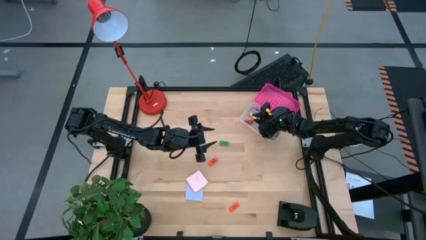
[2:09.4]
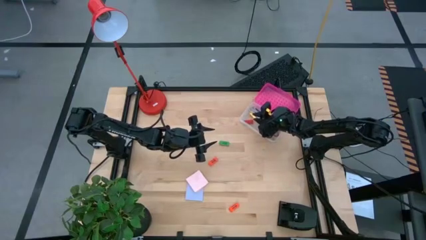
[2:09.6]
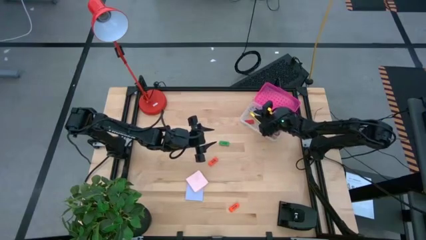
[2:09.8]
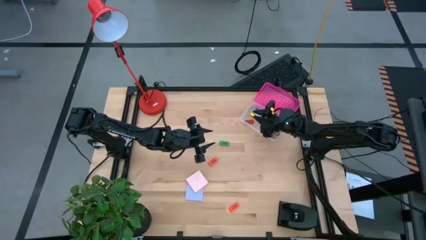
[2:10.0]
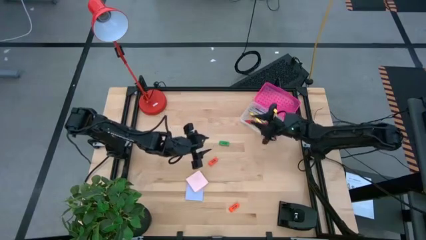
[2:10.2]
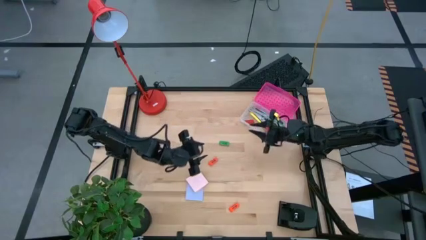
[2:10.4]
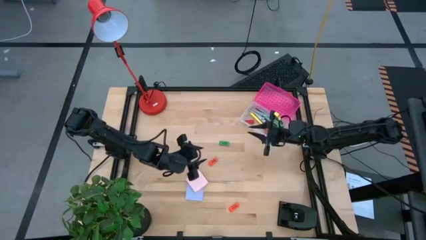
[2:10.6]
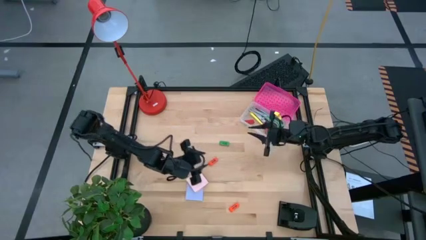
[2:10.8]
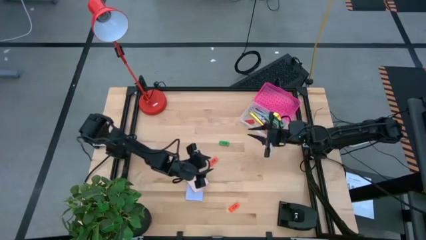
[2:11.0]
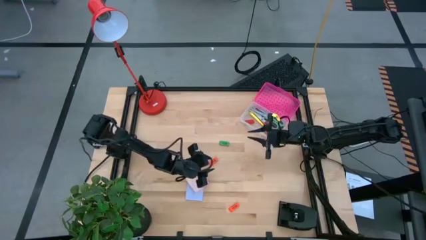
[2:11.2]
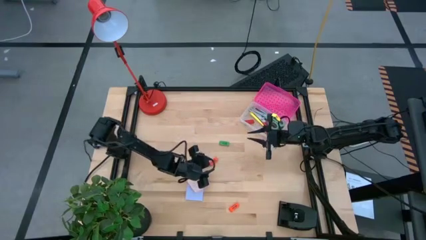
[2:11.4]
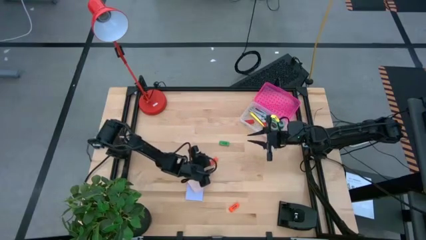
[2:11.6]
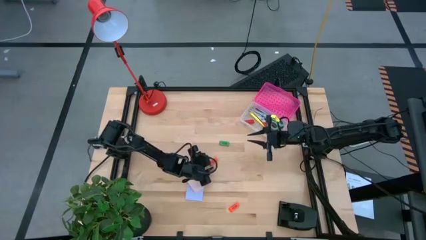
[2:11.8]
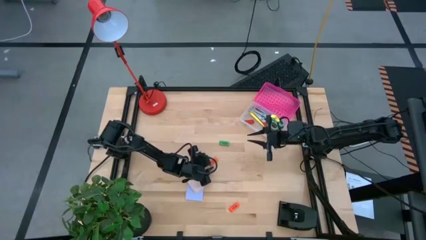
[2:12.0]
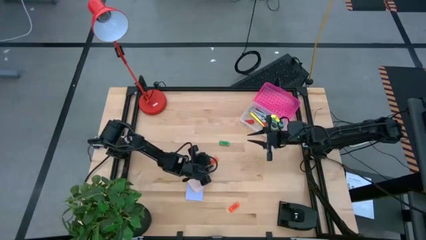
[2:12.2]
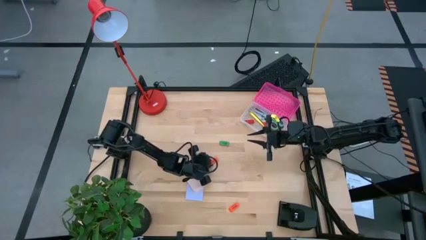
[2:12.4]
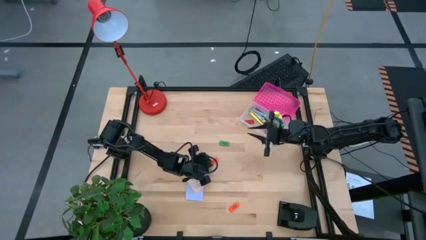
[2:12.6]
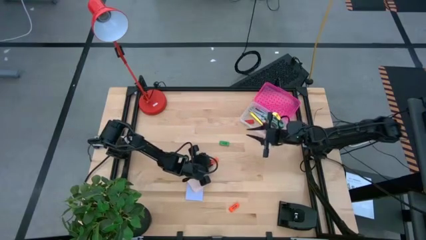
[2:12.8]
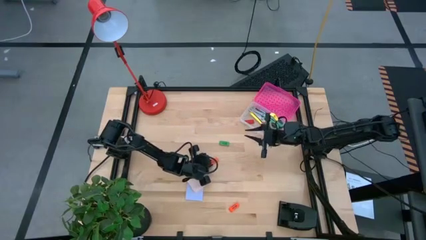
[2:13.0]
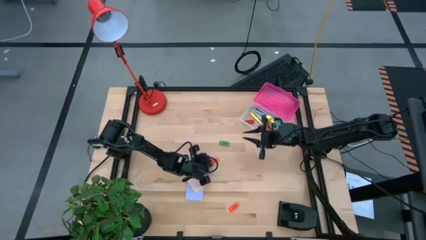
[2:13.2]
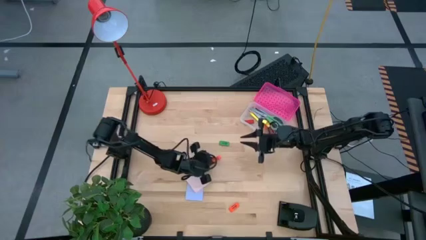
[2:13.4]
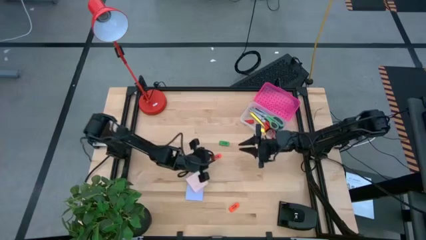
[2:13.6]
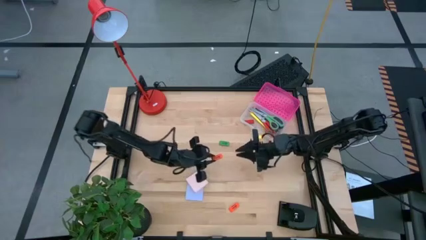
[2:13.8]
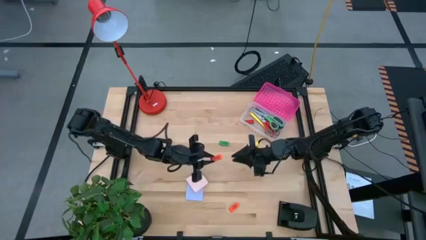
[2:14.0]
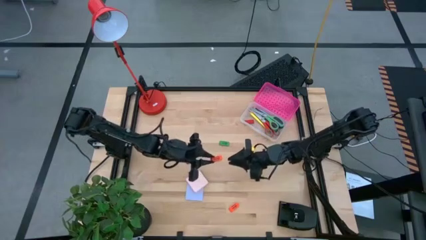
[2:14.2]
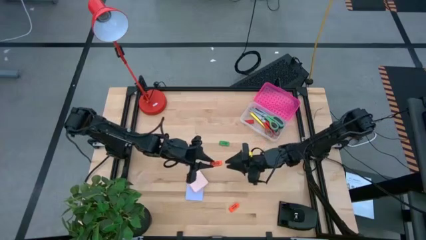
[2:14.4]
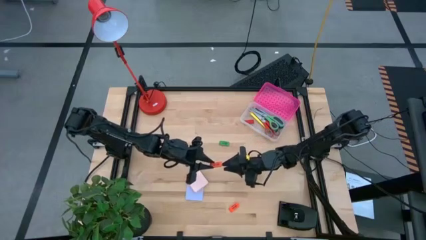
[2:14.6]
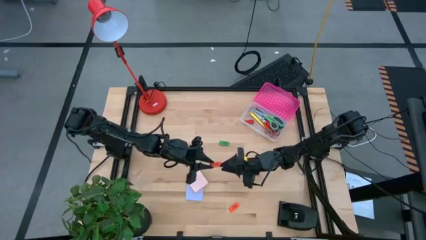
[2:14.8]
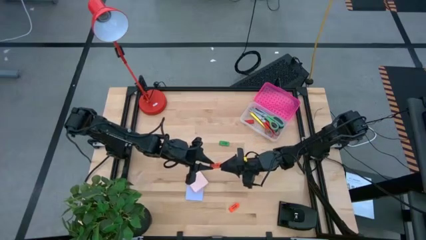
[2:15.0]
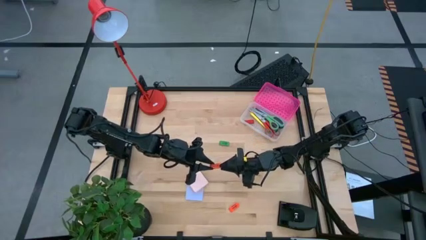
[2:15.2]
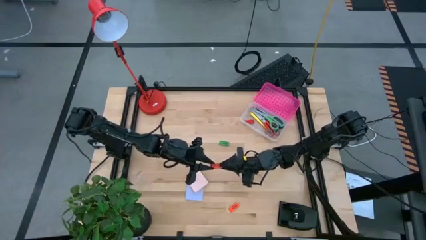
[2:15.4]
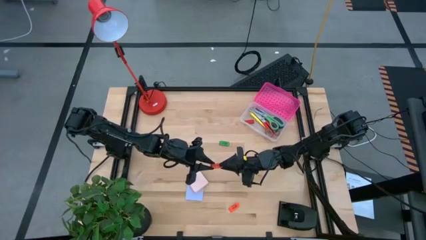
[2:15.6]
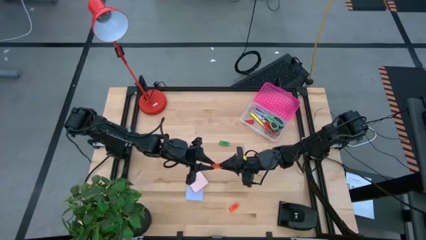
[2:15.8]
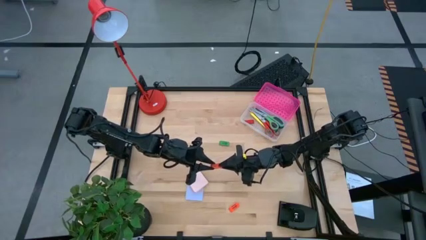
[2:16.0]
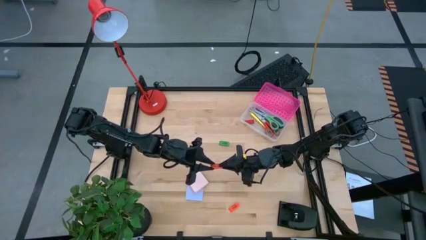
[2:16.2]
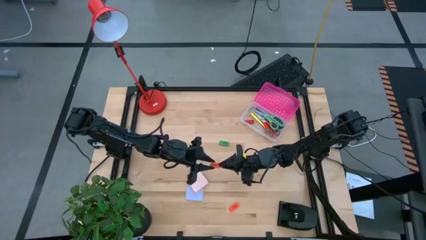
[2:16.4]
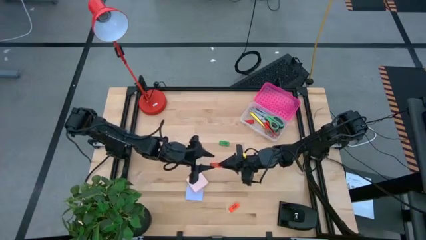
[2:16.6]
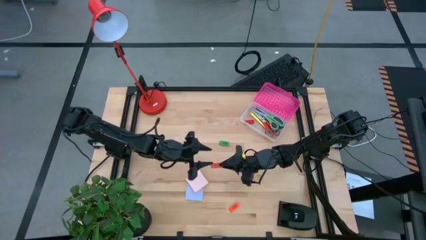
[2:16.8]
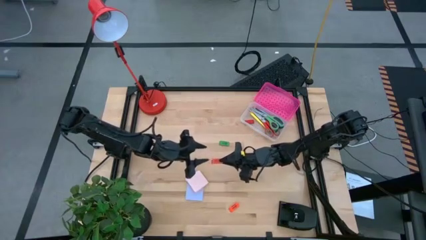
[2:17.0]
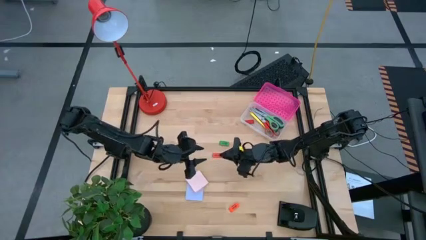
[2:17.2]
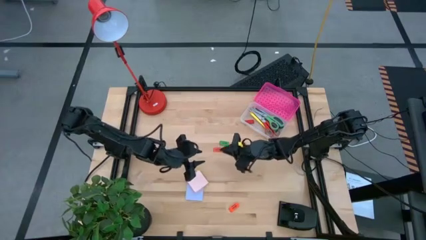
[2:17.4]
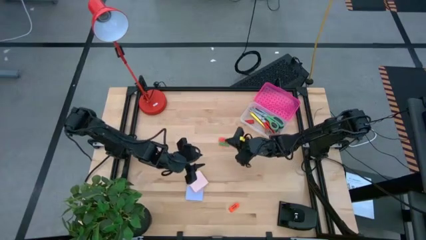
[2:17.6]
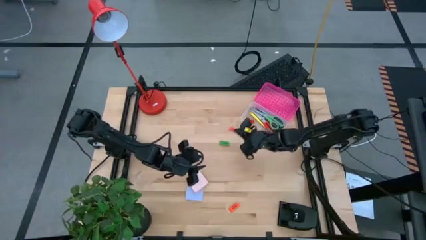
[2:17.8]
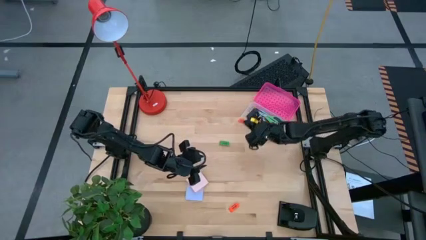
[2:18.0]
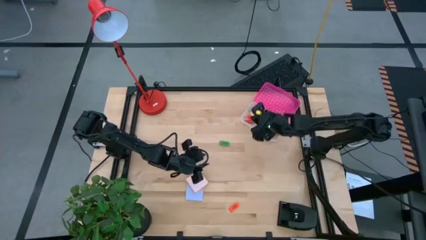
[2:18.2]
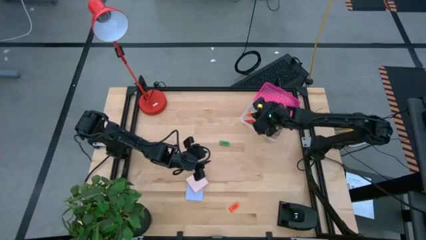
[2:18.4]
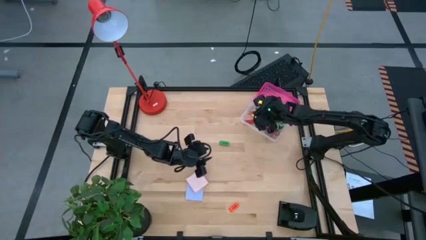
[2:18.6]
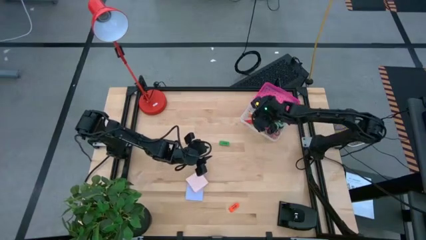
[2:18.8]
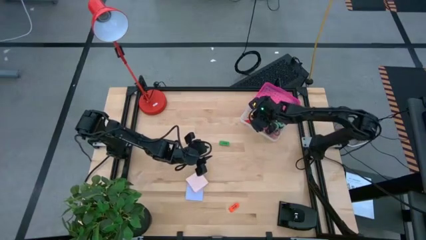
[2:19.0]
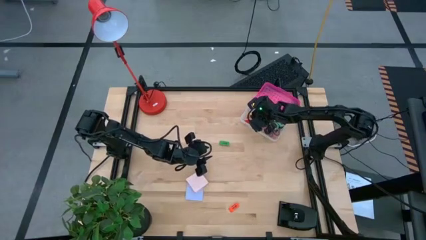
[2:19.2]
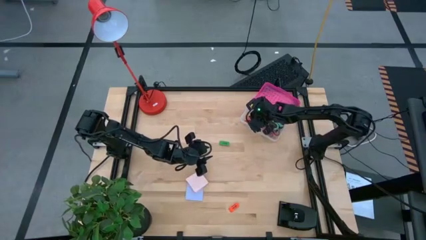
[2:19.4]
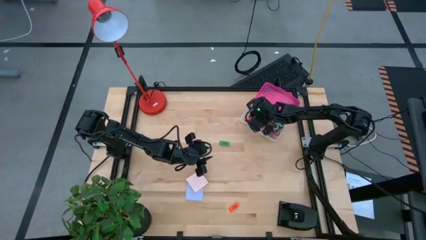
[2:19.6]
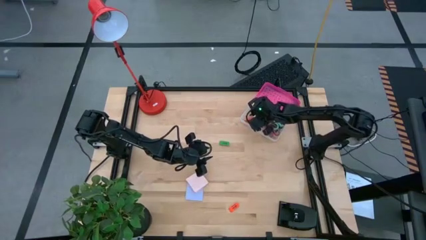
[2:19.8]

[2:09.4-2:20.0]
Task: Pack school essentials
Put the top orange eraser into the supply box

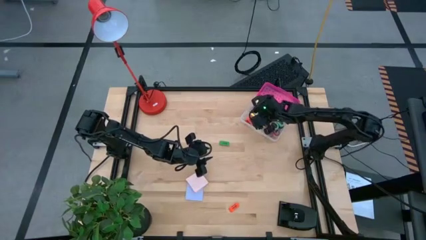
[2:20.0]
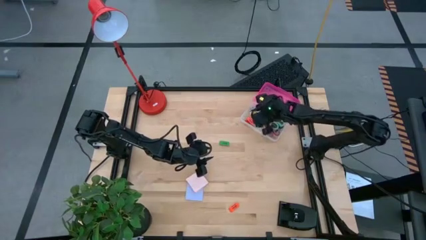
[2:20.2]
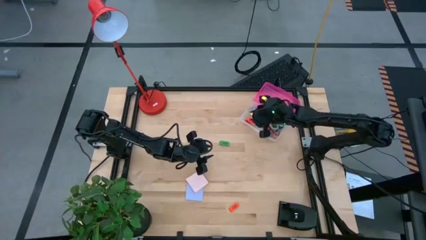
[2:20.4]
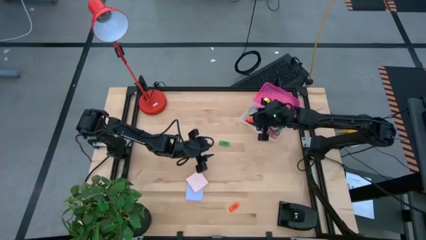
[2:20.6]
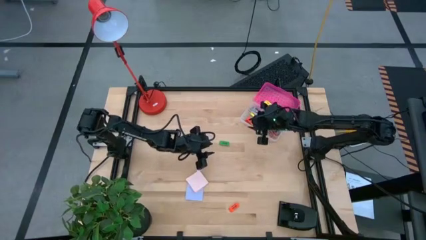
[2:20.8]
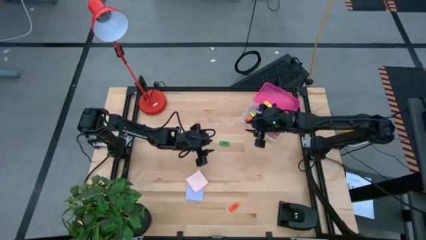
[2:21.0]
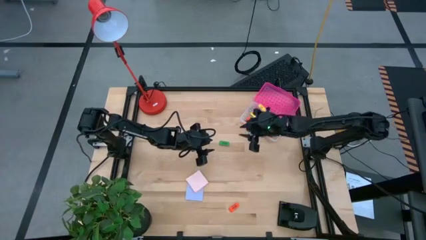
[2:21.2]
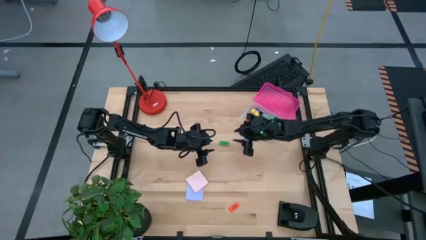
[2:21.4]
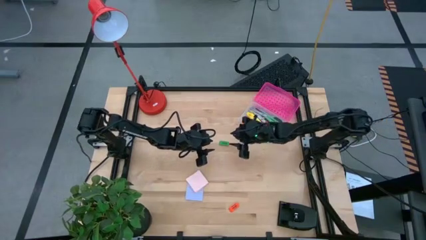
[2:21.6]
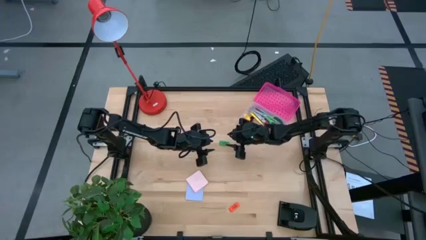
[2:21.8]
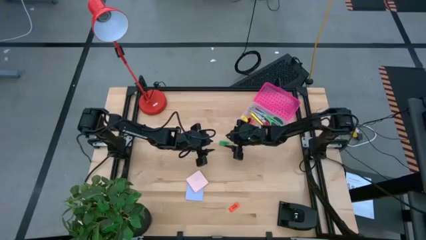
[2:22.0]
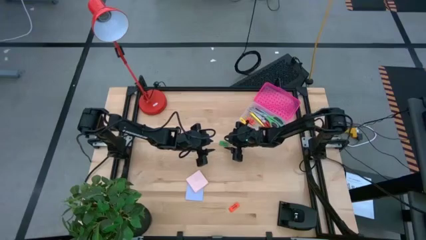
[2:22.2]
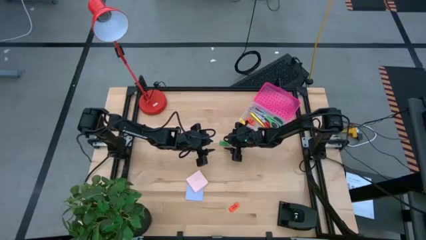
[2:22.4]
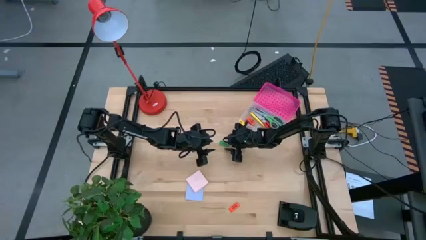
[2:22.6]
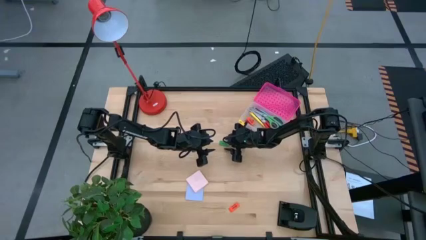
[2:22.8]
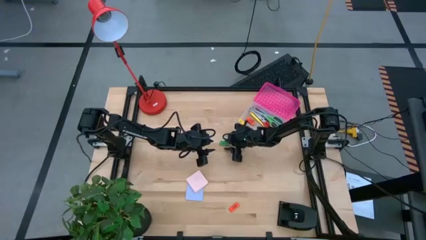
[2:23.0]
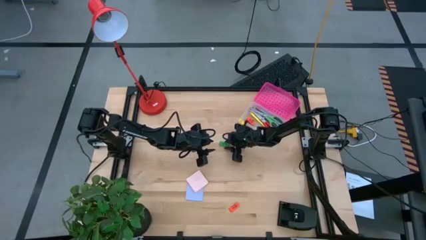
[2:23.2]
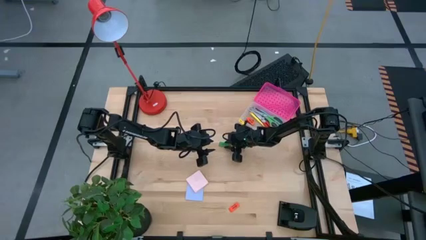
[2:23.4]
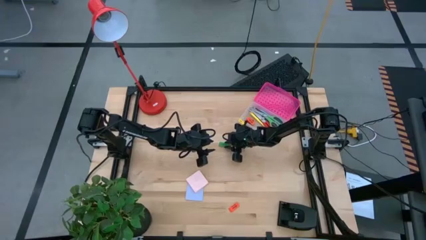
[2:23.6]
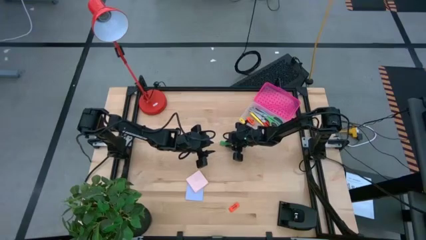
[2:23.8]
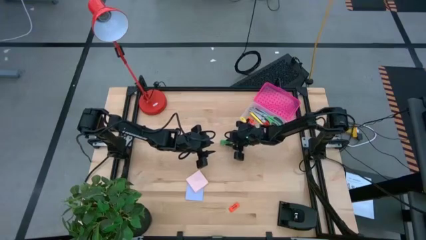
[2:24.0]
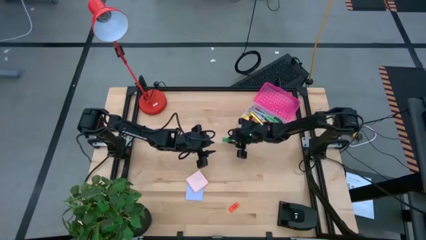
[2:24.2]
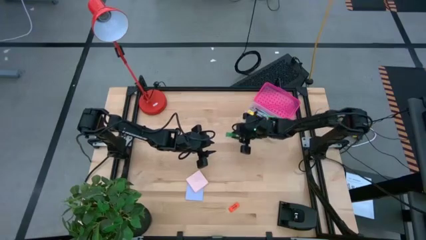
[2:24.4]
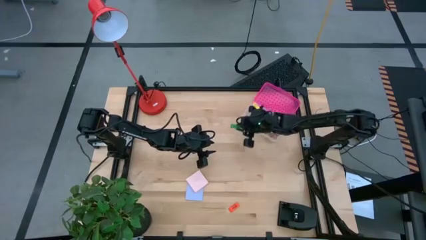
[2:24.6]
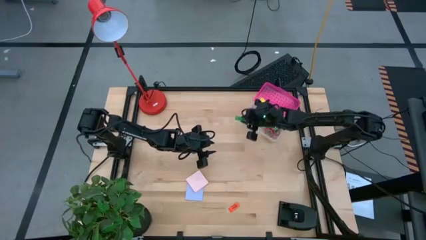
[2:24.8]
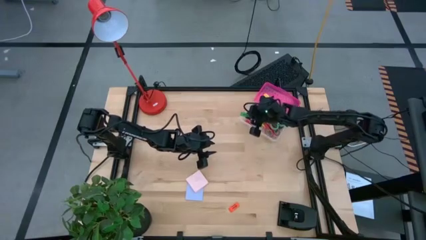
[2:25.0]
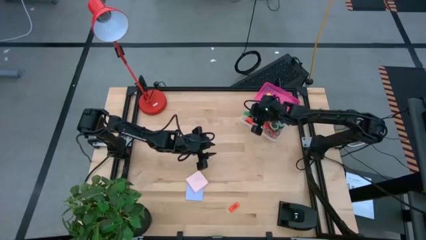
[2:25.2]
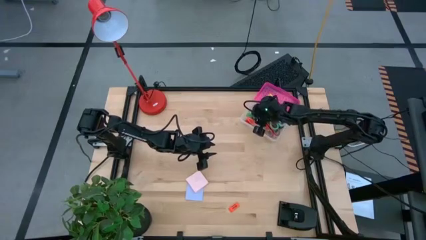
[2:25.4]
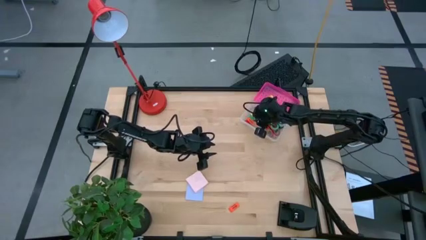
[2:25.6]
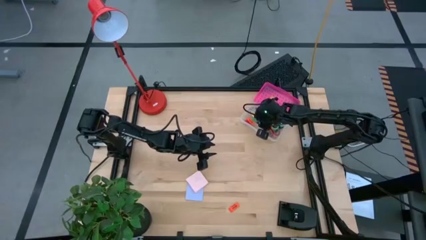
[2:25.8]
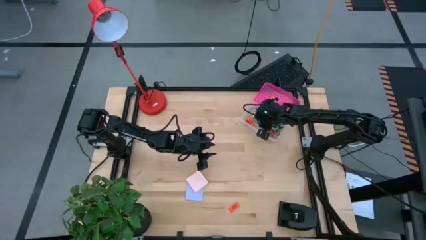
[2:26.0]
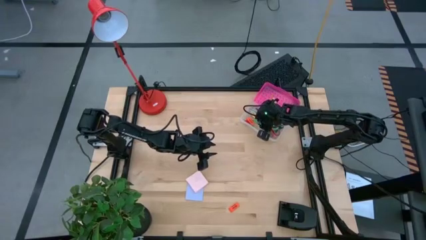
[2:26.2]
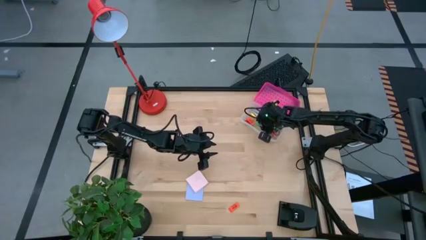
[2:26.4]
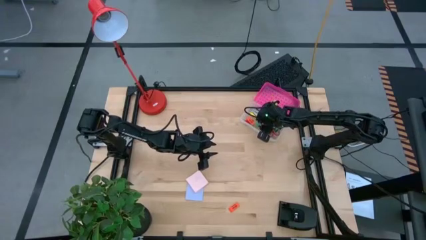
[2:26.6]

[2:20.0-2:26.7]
Put the green eraser into the supply box
